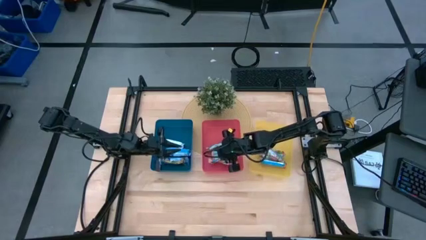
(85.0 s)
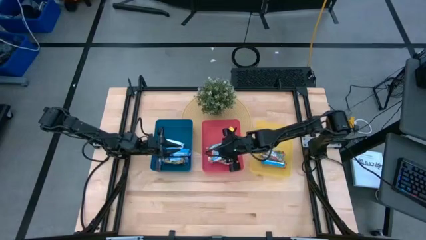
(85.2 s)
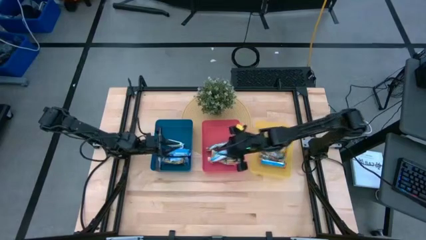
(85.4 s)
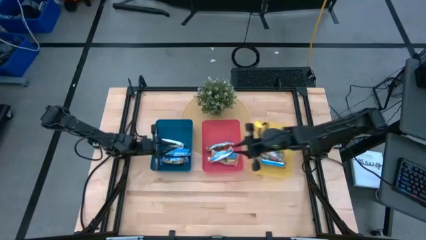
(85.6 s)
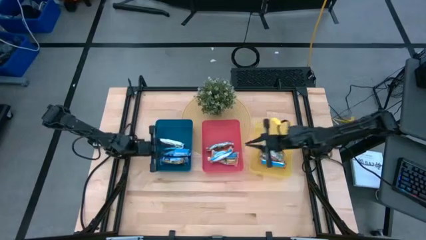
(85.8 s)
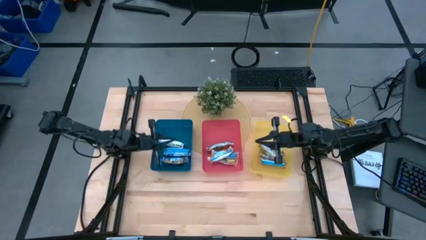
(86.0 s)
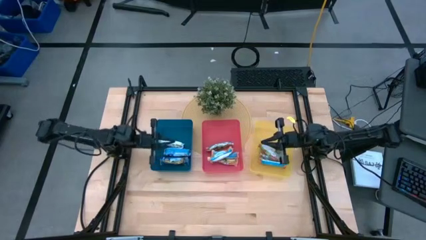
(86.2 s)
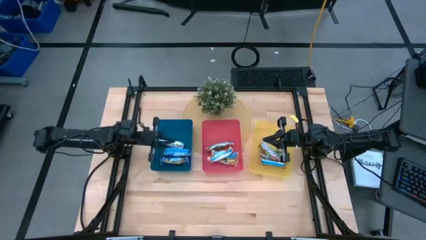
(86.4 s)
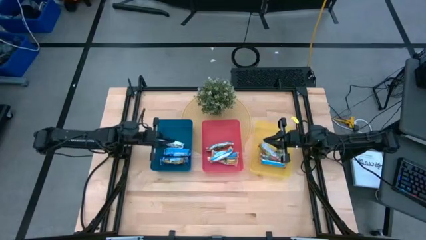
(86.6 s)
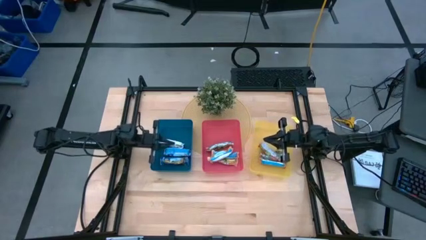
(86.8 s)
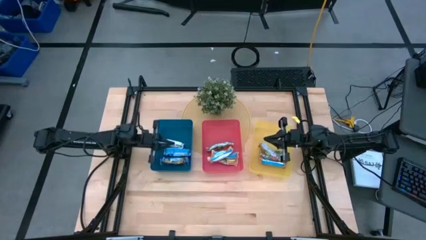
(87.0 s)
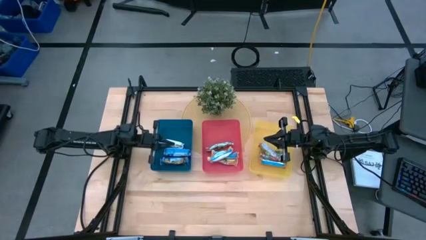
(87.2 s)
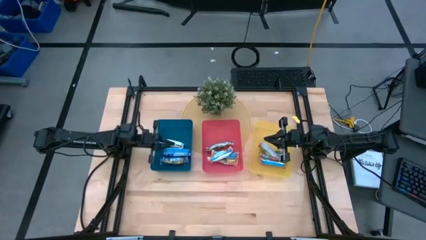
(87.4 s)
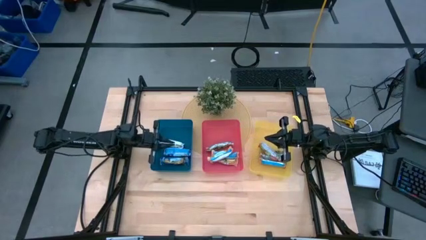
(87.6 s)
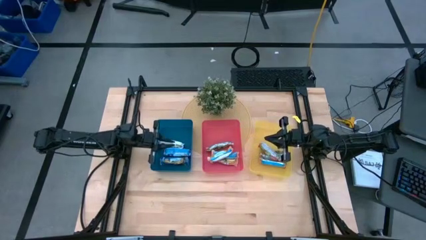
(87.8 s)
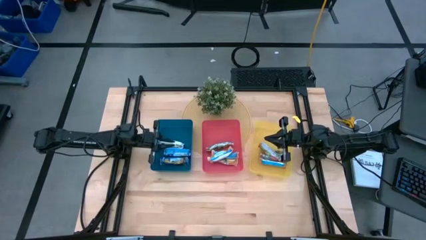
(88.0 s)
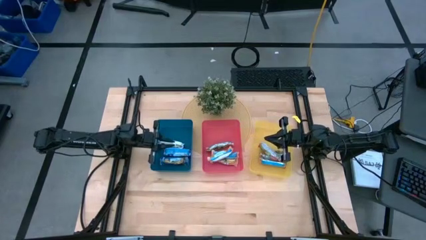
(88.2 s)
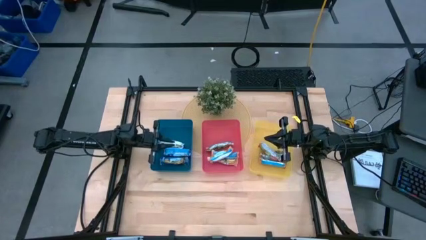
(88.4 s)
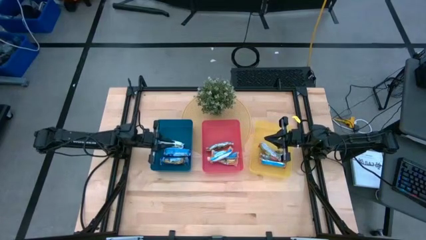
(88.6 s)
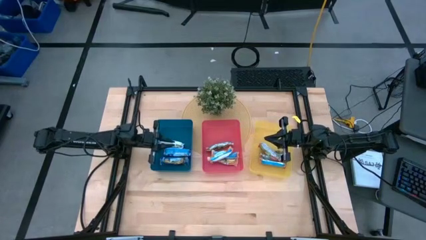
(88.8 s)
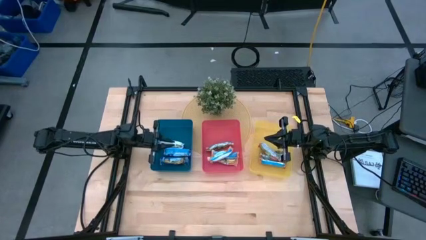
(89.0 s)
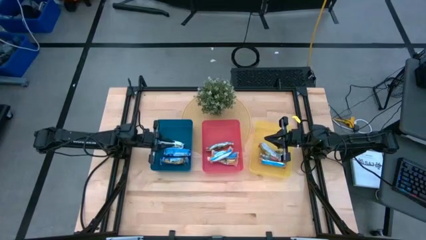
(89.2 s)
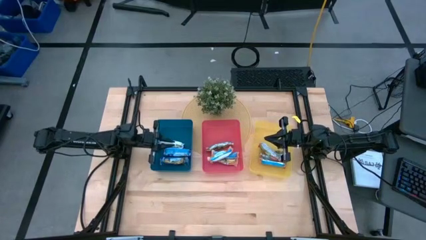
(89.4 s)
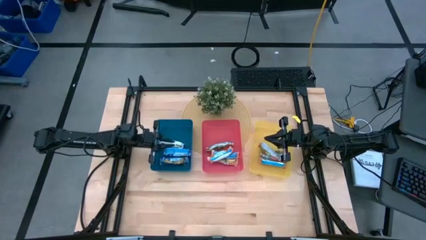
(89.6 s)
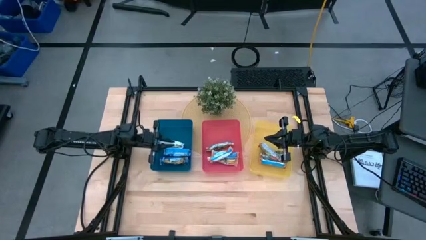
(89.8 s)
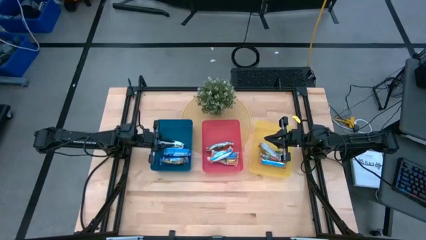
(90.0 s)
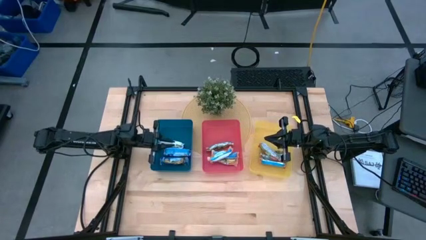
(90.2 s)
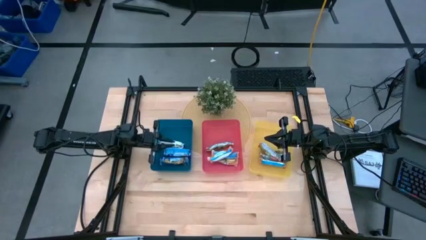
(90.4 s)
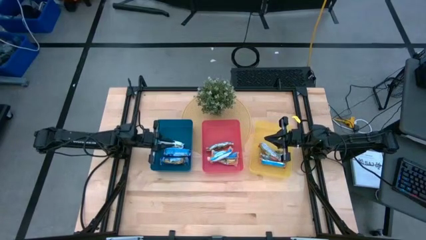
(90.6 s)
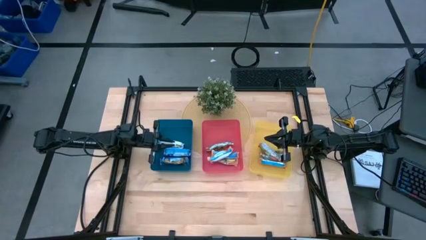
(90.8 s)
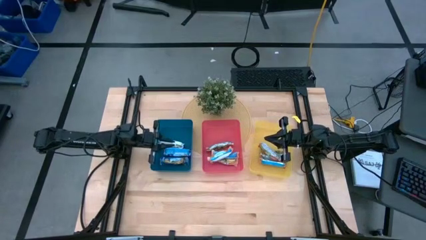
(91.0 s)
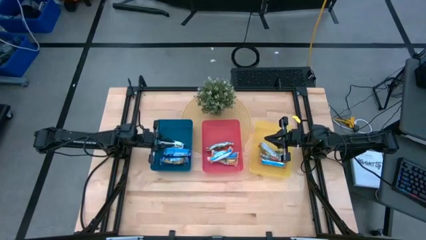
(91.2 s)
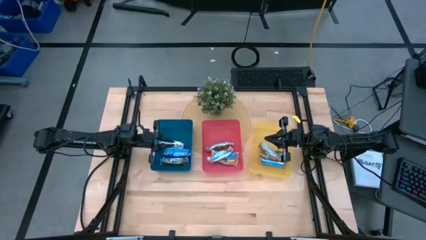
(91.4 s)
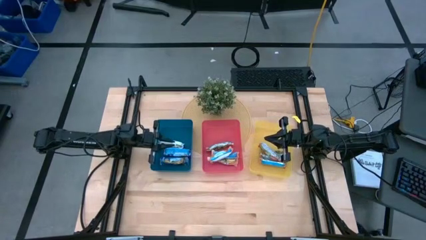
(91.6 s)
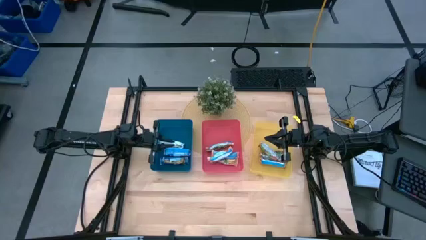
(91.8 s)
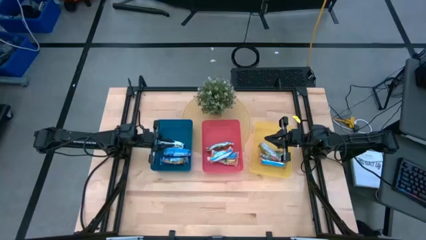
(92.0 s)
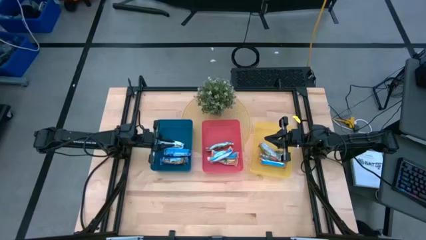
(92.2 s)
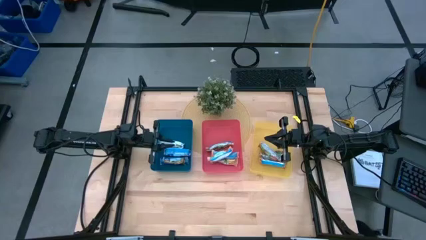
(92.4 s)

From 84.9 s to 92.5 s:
Task: Pick and place Granola Bars by type
Return to Home Position

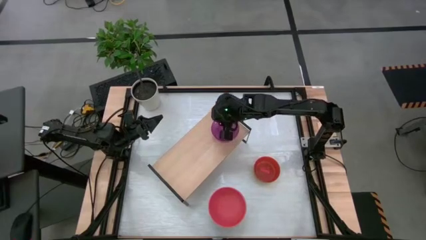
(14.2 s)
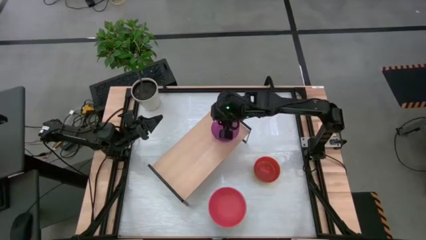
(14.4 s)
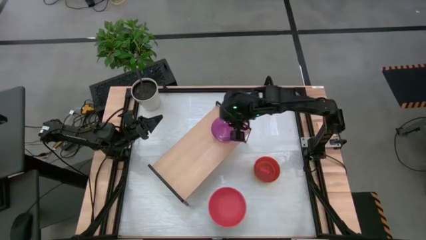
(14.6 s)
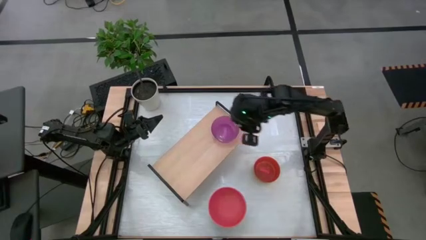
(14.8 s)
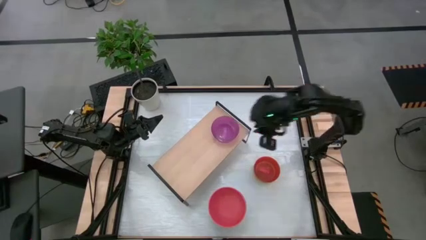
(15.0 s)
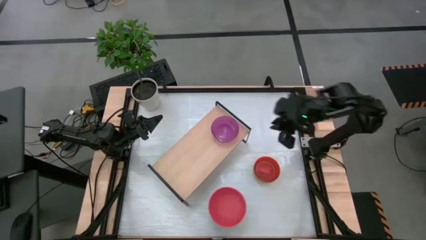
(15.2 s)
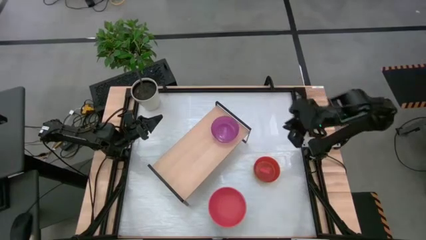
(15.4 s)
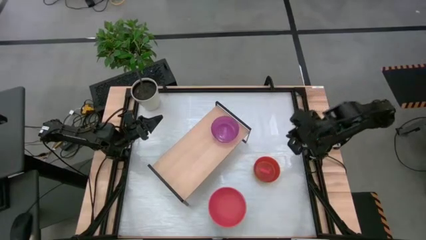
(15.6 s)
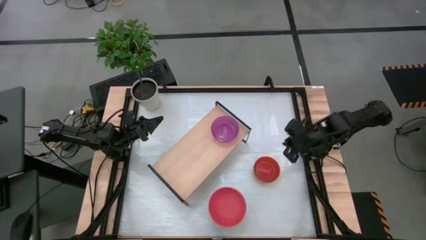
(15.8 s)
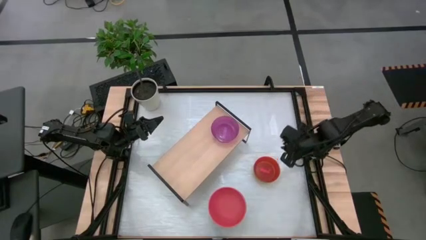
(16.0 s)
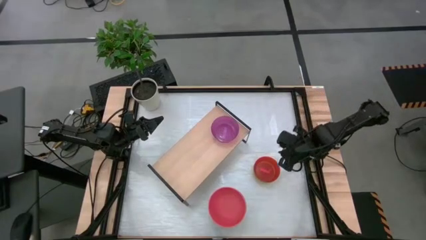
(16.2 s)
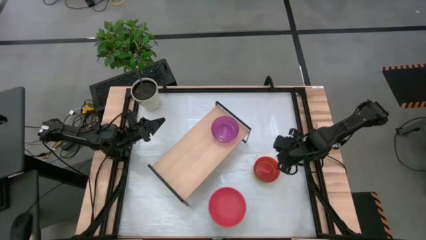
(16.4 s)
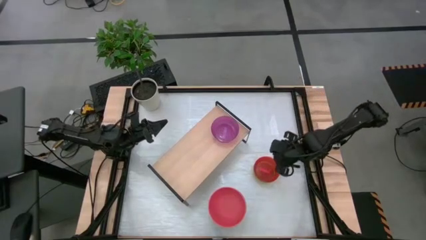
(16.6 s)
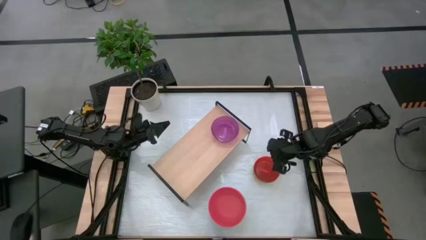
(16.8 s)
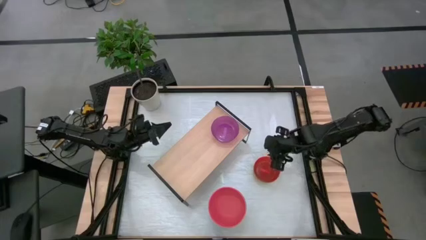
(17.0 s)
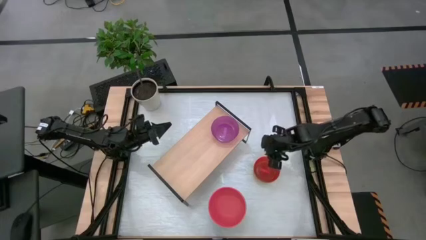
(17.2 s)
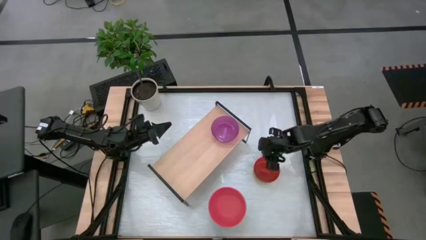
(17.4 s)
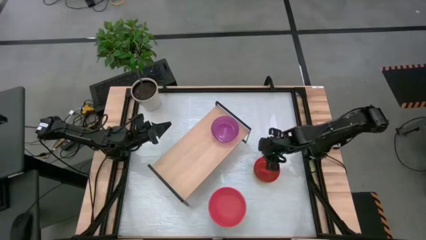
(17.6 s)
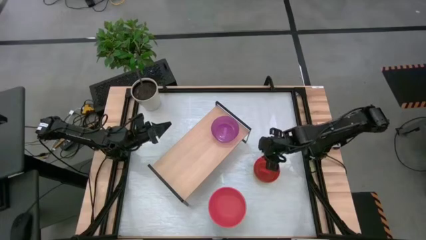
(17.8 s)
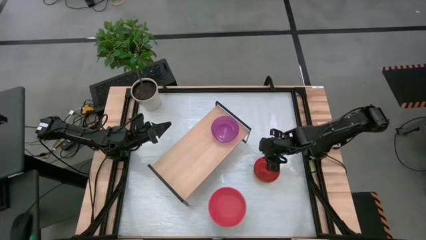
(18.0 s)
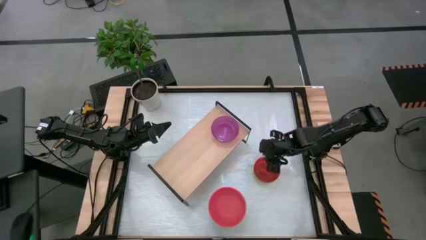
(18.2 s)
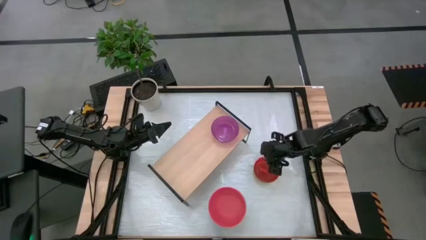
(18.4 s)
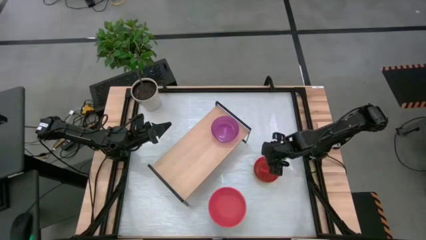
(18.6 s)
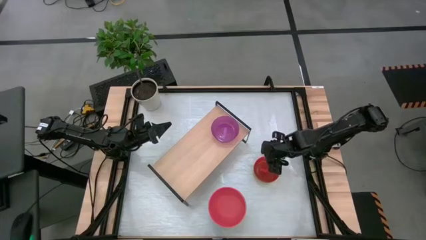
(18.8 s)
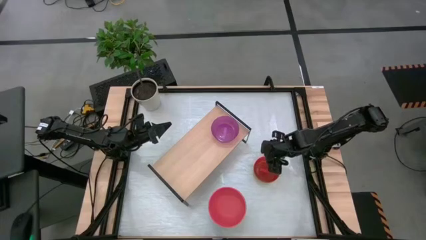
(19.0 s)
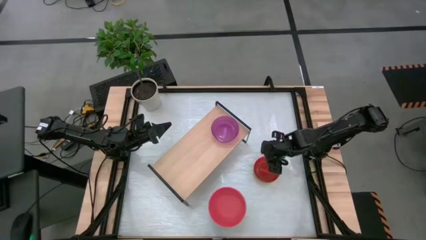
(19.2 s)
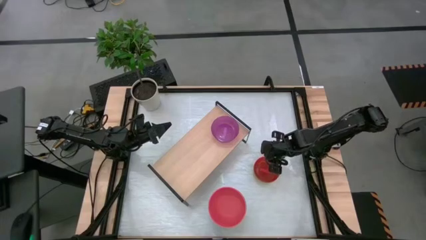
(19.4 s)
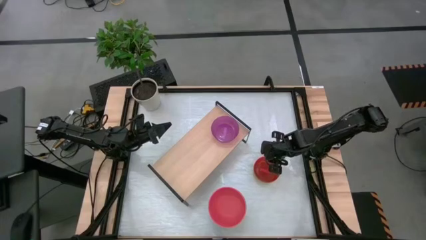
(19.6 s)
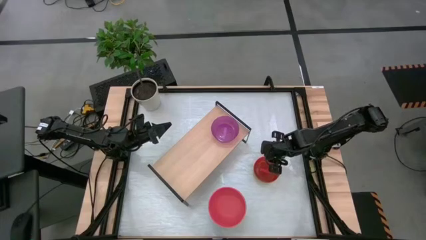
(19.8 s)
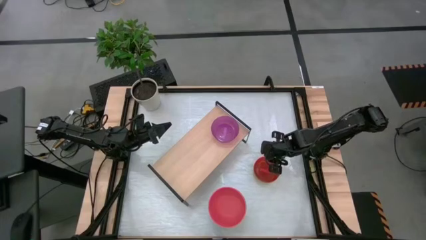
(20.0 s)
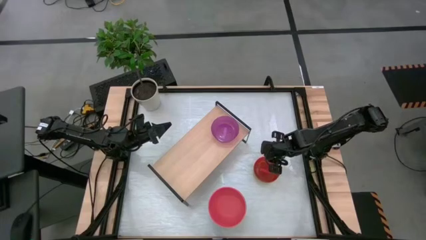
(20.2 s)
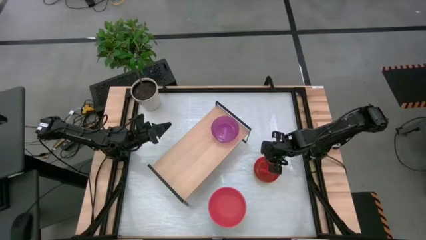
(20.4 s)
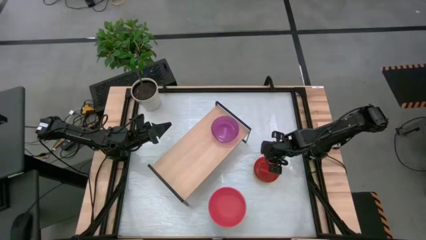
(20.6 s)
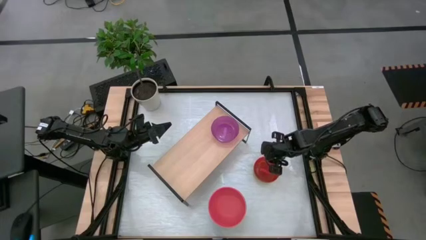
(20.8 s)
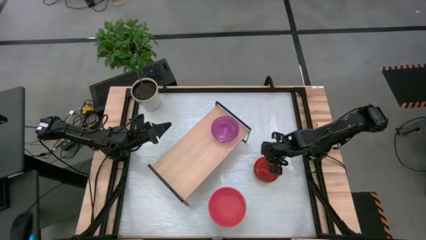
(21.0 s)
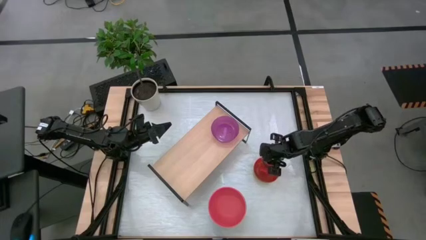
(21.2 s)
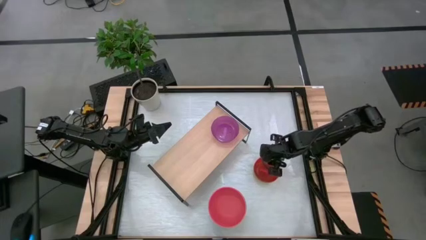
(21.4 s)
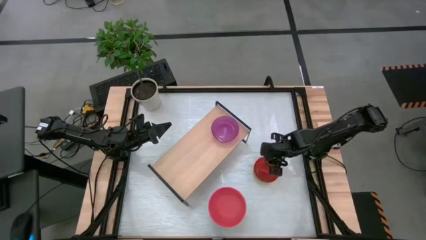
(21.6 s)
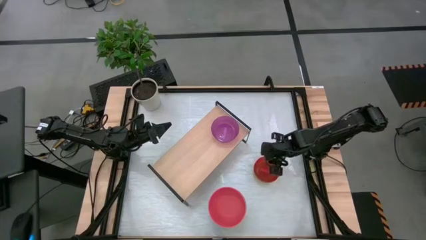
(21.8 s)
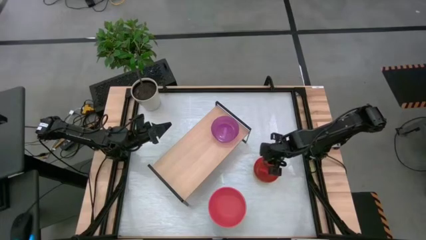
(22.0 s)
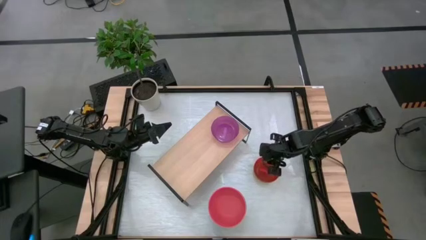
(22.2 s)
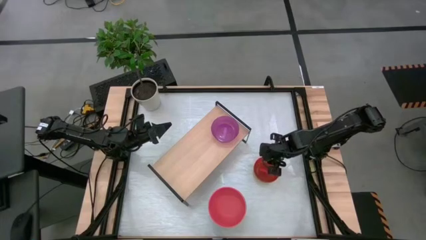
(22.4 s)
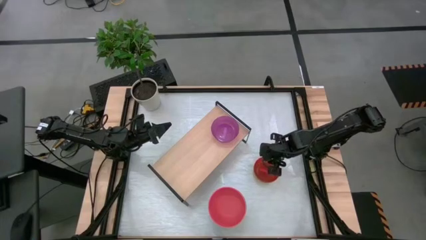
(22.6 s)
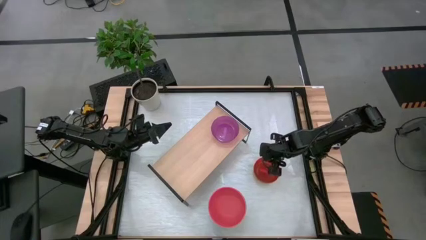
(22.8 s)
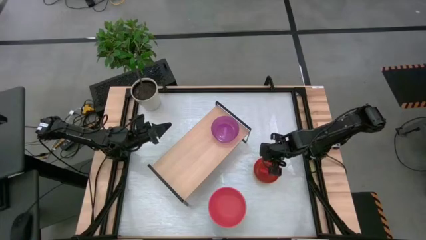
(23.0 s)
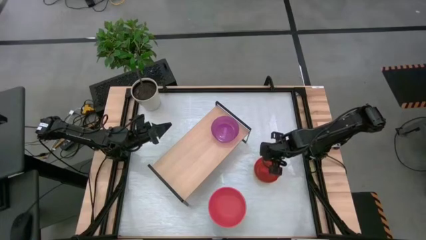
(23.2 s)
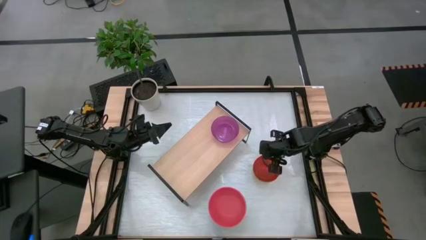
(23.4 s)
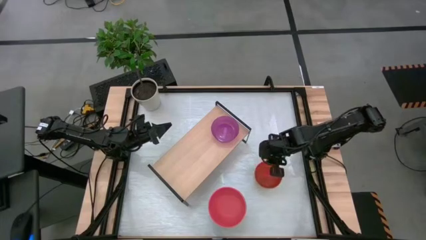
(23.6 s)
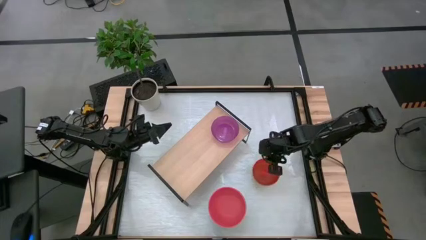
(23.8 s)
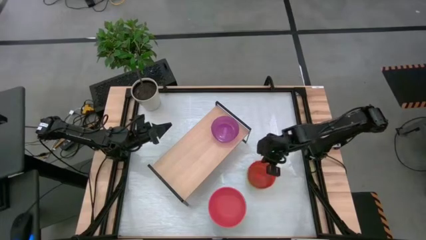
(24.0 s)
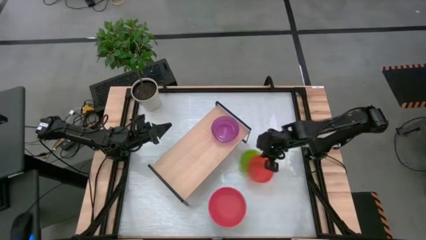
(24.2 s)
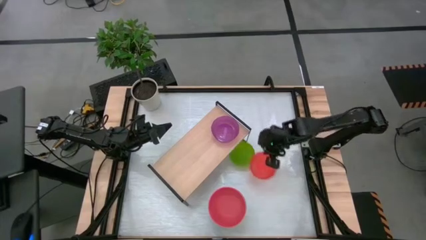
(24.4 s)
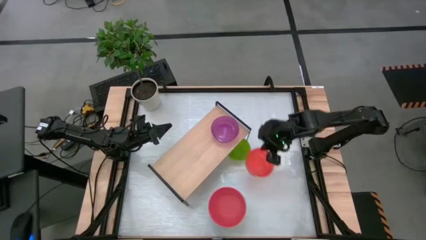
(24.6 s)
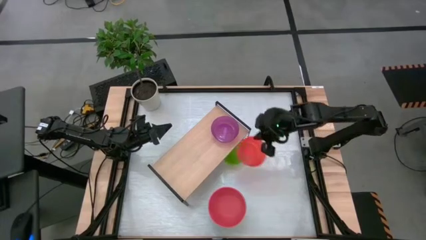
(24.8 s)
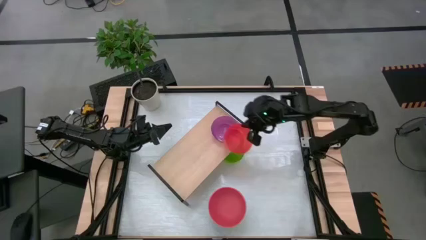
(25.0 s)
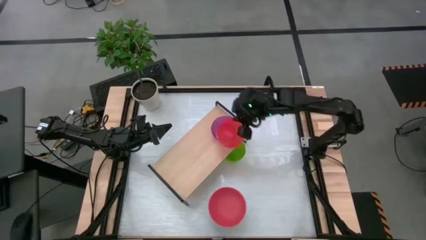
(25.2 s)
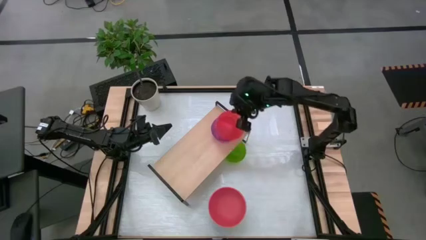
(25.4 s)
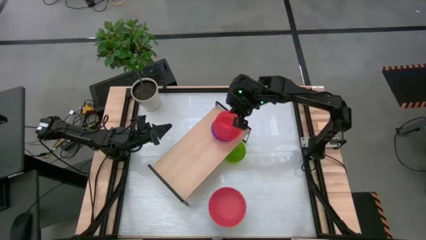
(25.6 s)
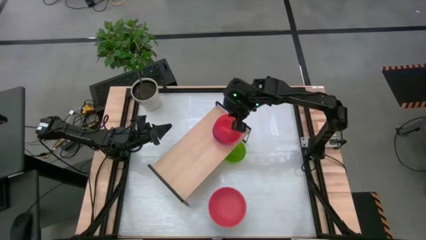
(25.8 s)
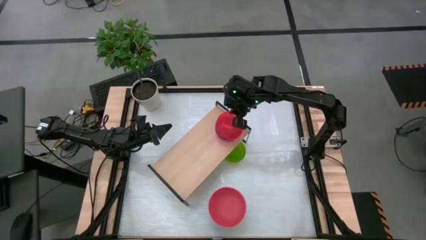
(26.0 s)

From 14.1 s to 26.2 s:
Task: Place and stack bowls onto a shelf
Stack the left red bowl on top of the violet bowl into the shelf
